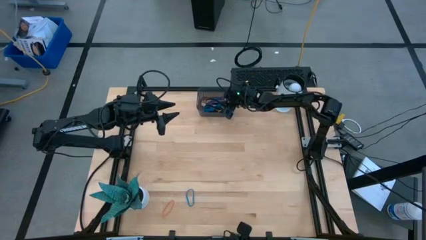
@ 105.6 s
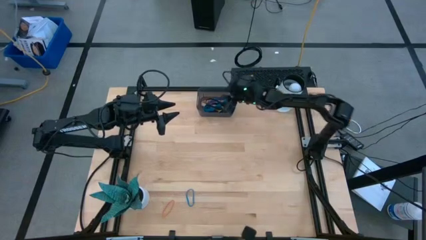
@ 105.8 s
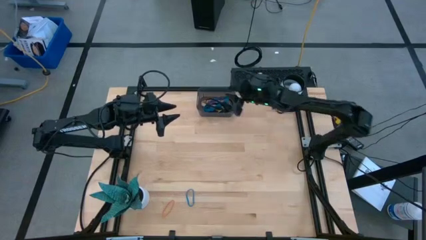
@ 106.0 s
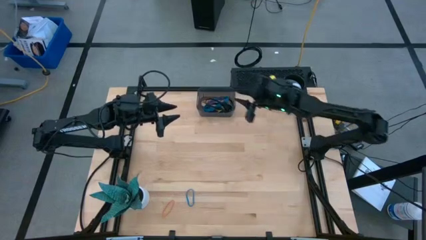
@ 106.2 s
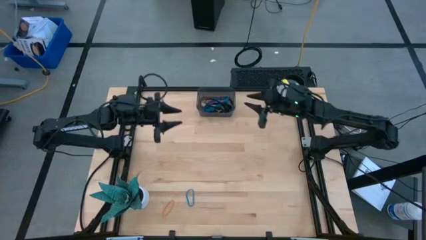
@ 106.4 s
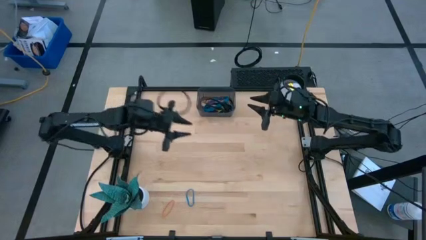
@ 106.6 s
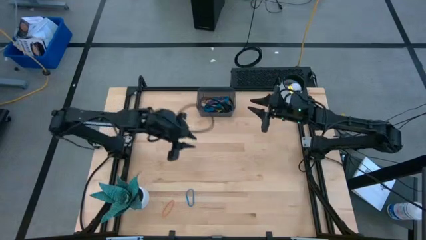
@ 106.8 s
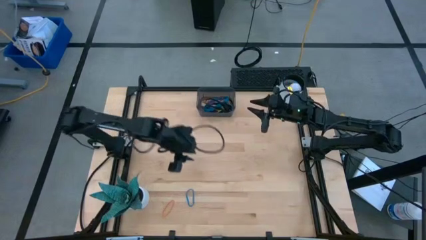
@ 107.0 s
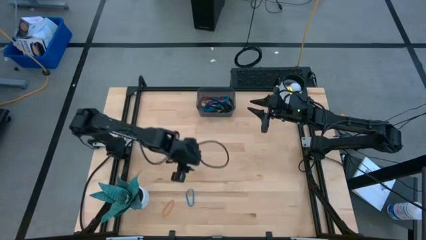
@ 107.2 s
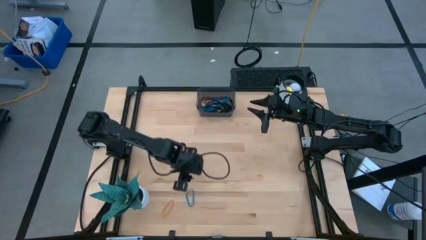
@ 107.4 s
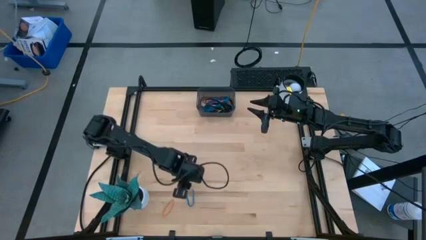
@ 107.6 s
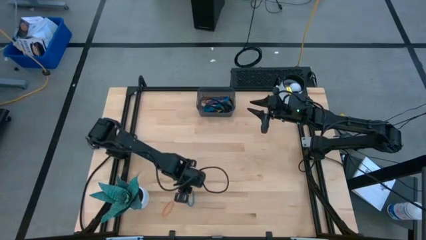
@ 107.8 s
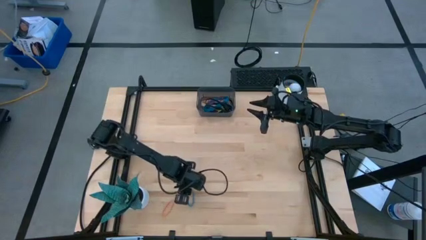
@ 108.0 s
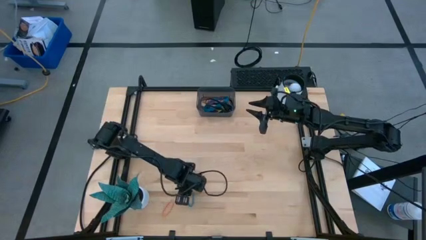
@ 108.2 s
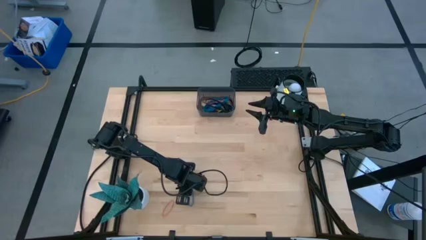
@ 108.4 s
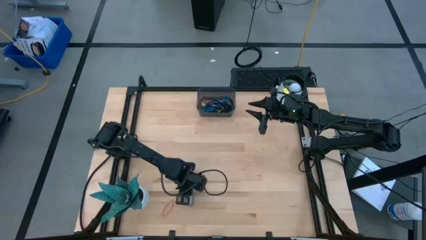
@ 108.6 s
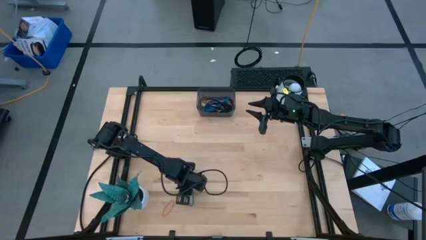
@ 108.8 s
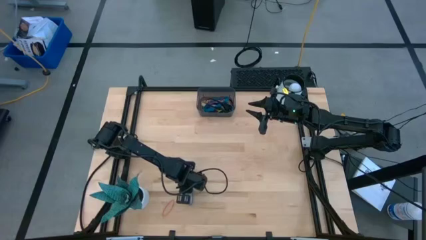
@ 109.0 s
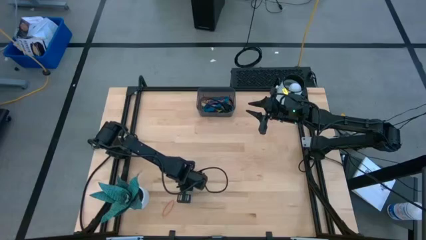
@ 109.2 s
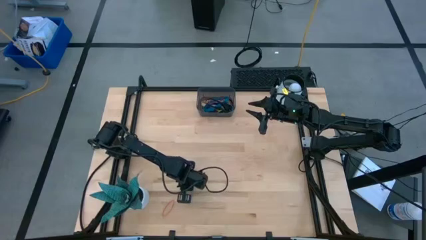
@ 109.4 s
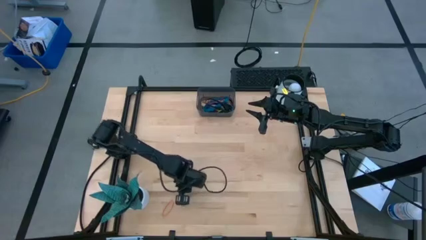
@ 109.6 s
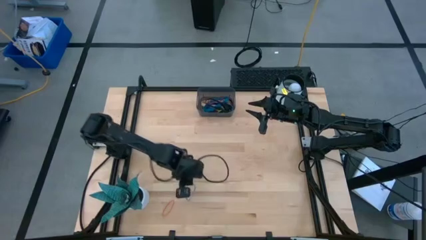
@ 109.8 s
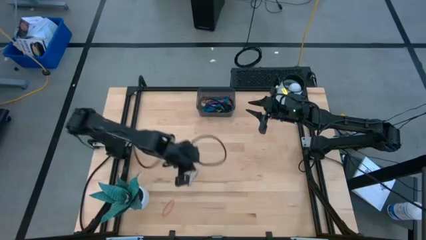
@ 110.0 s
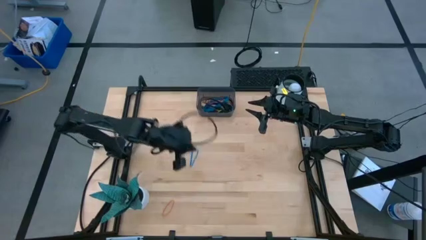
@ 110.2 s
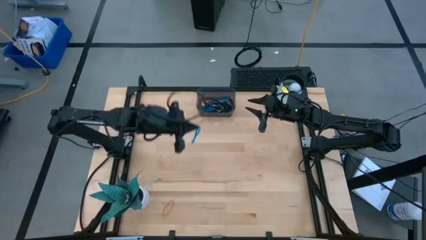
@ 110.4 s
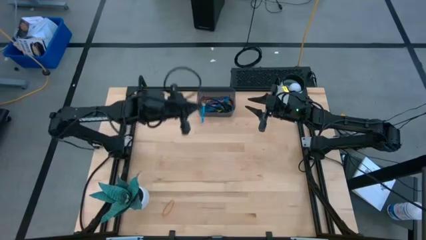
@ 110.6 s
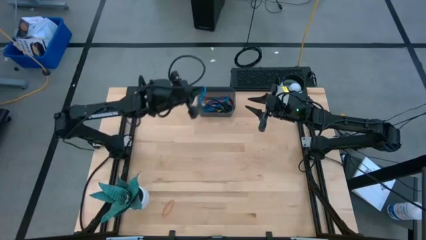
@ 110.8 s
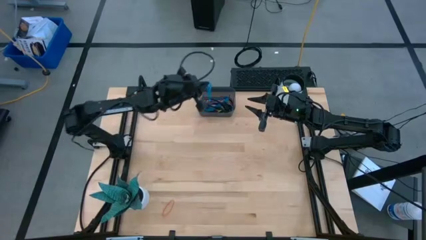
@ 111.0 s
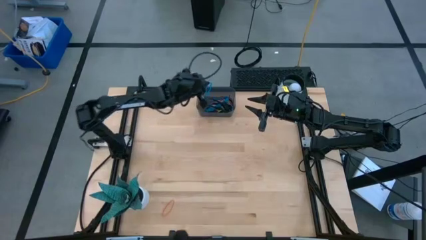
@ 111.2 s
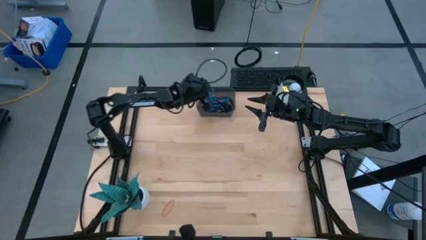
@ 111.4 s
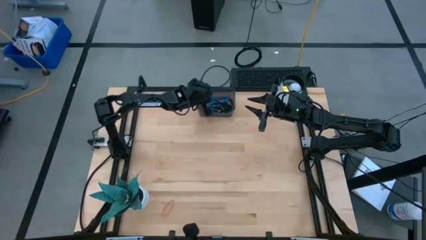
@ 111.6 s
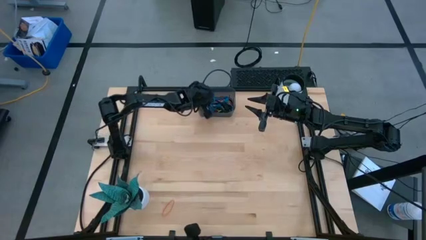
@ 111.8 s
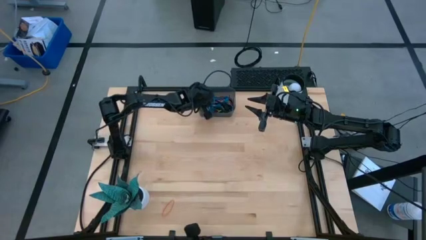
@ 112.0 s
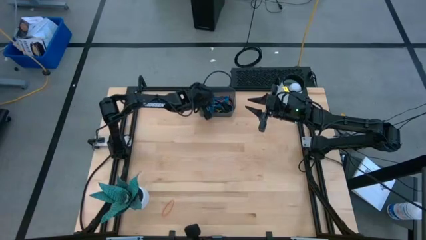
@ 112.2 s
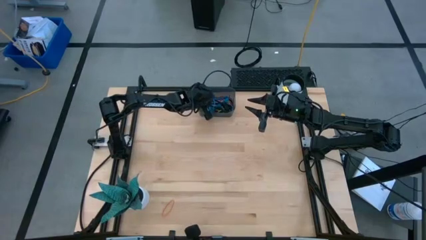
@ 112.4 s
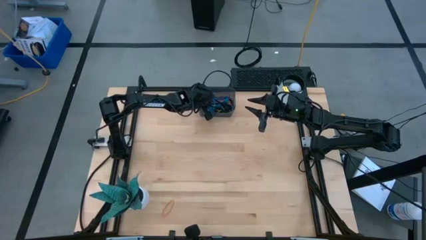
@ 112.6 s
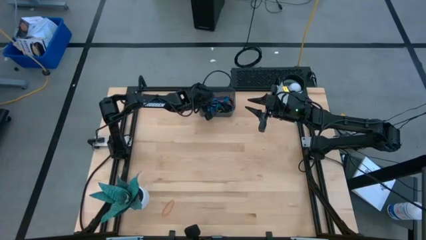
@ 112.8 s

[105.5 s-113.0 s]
Task: Pick and place rubber bands into bin
Put the blue rubber band into the black bin

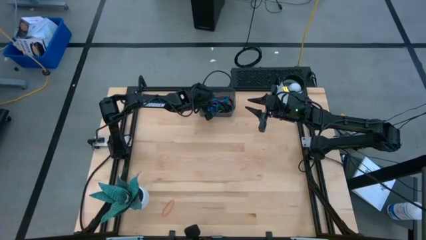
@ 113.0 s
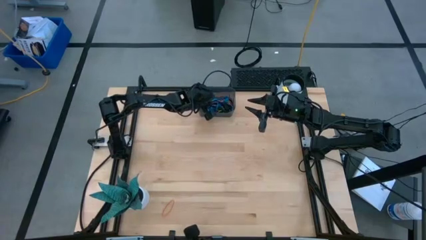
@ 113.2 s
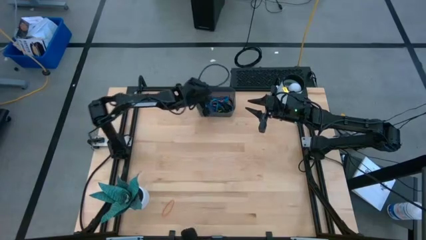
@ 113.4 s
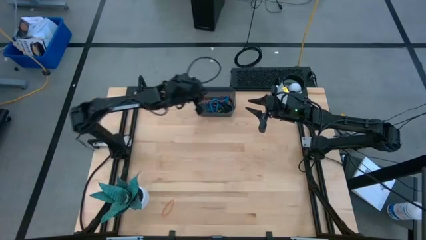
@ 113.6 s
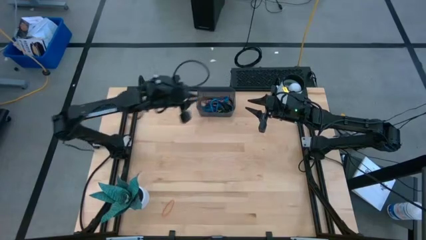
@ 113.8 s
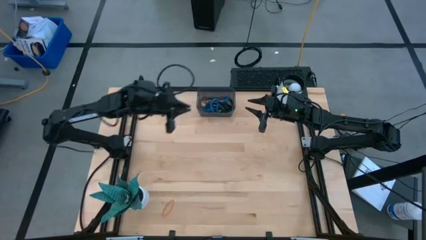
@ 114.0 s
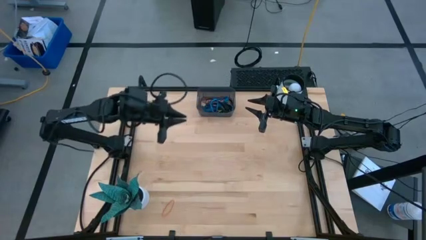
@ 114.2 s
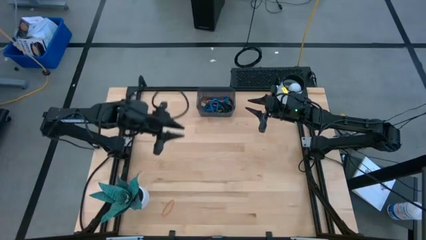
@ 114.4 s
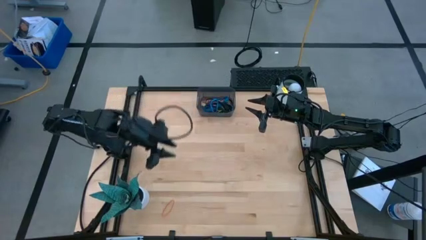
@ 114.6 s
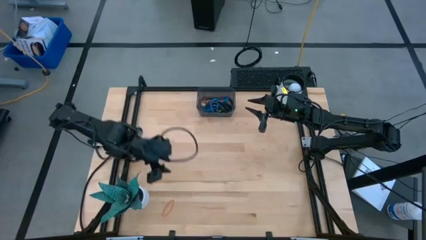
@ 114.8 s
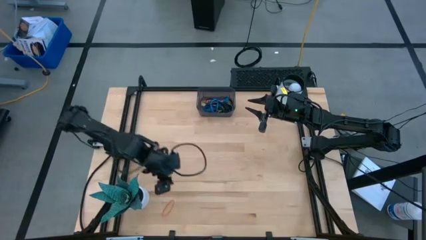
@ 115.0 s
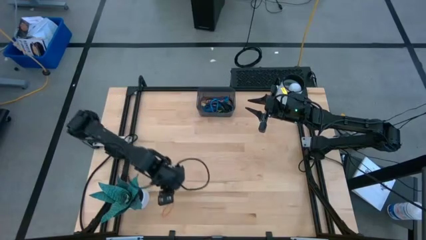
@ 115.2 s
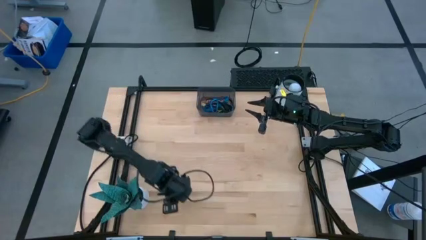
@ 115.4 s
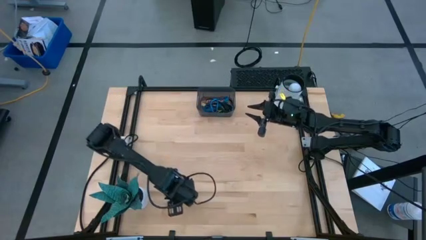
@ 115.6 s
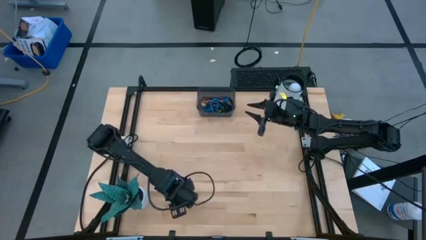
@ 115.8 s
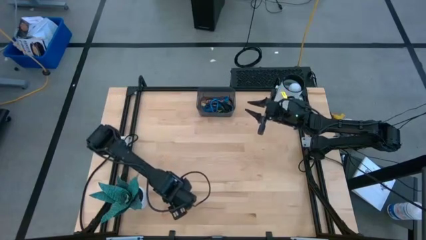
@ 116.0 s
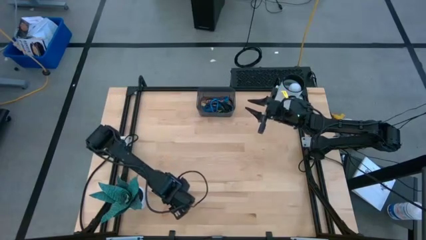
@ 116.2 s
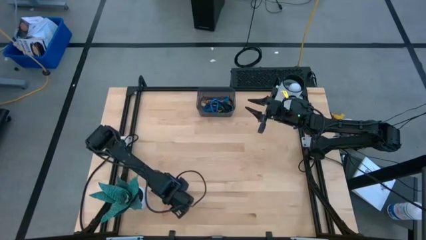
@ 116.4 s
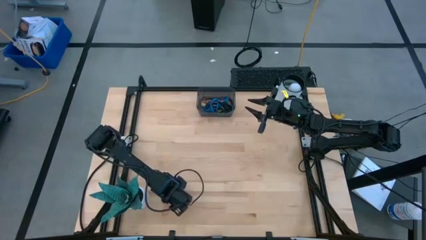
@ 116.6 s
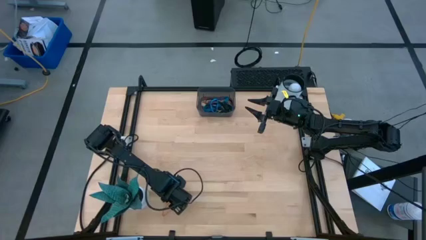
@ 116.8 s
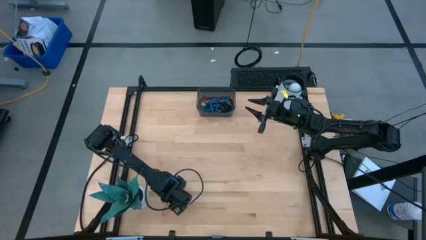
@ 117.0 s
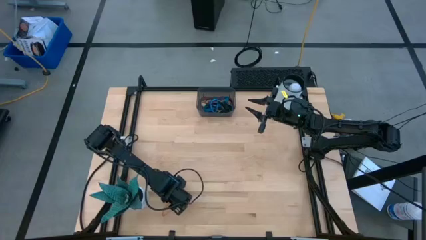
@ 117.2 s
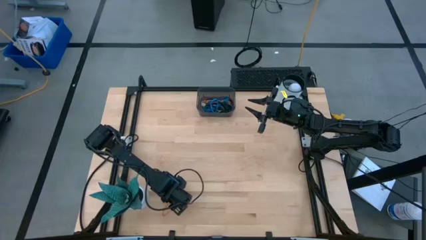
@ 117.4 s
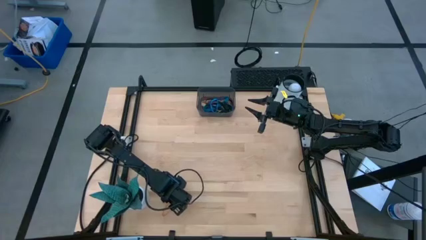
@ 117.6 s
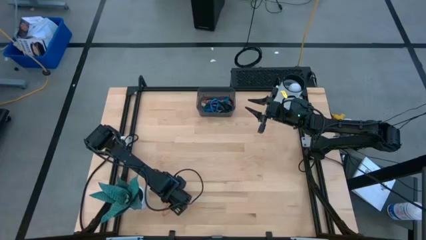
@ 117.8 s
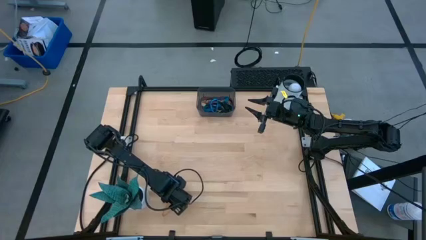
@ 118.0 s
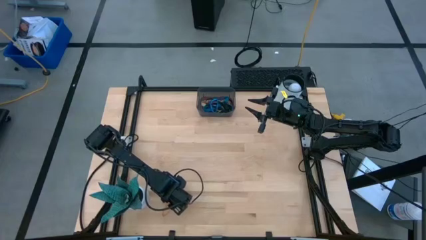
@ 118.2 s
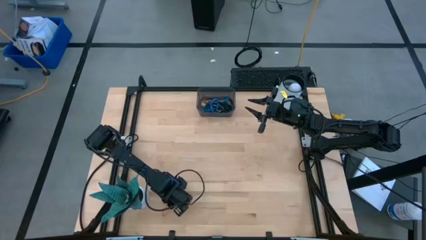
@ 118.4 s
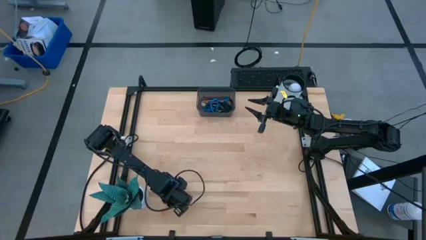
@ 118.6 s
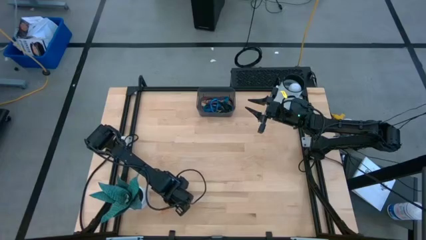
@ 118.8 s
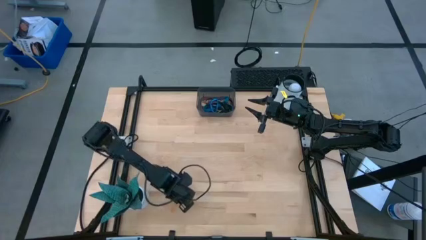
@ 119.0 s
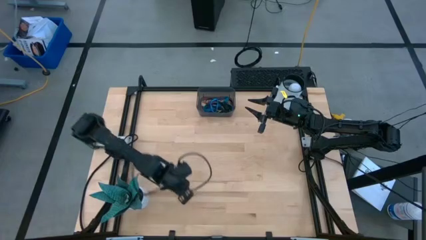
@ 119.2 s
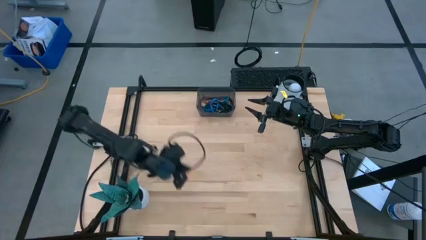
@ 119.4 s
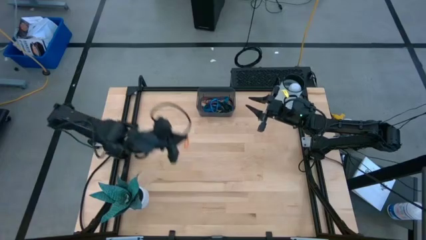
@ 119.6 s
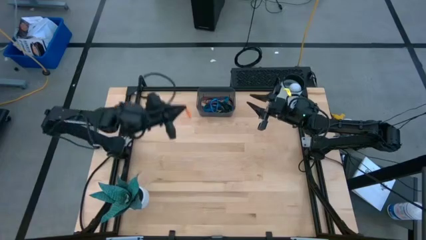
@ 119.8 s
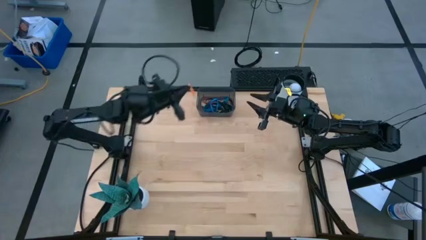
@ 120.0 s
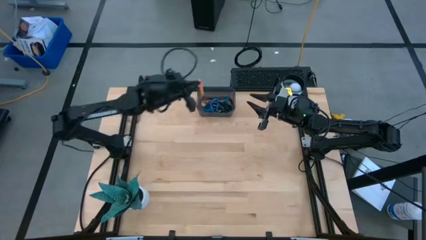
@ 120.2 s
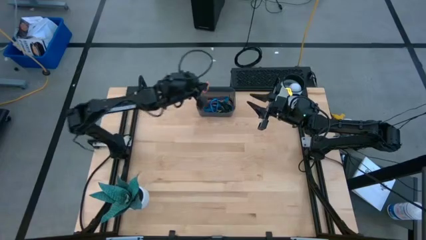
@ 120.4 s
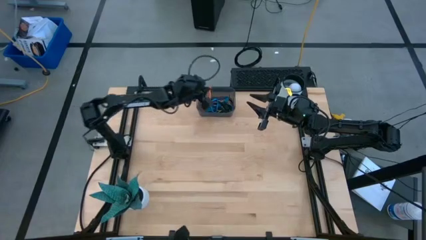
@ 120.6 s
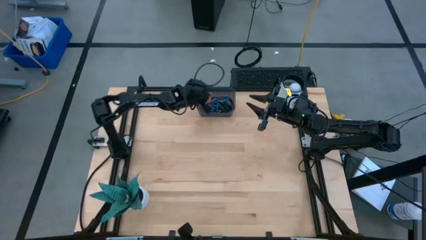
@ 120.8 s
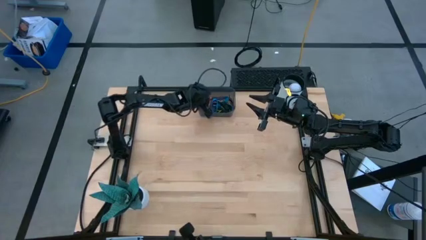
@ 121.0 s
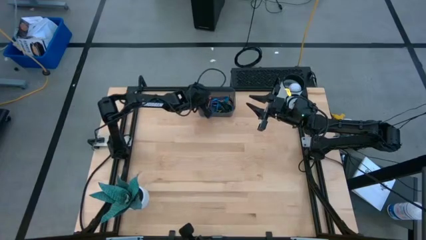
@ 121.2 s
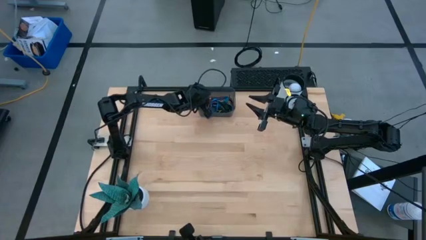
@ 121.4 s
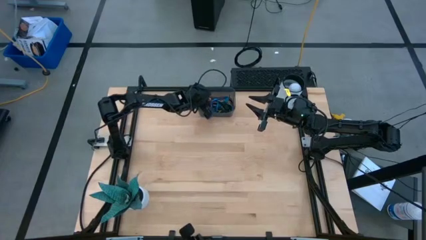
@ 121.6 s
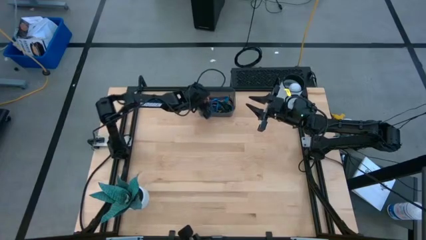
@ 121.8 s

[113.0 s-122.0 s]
Put the orange rubber band into the black bin
